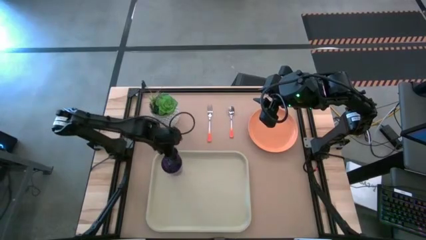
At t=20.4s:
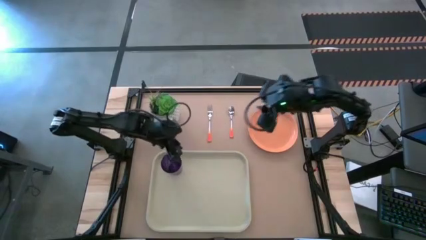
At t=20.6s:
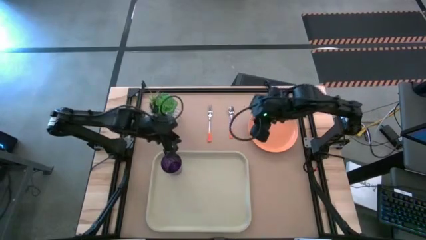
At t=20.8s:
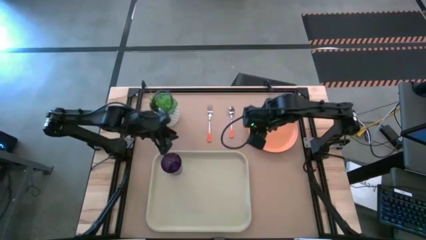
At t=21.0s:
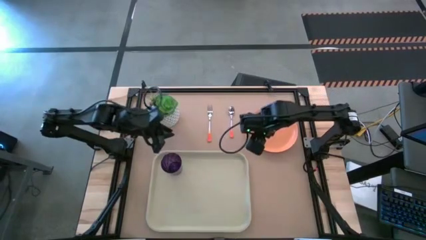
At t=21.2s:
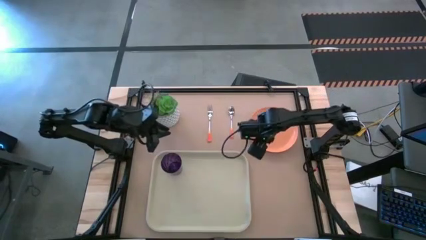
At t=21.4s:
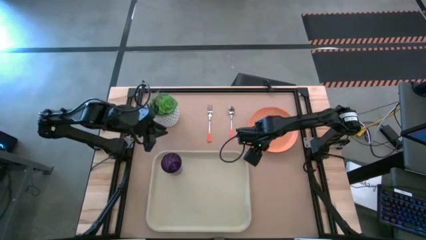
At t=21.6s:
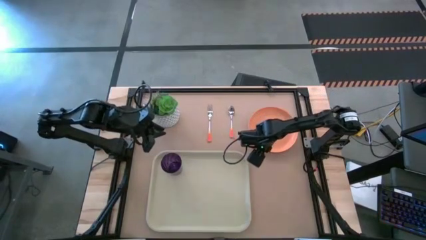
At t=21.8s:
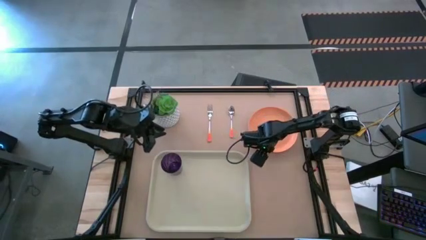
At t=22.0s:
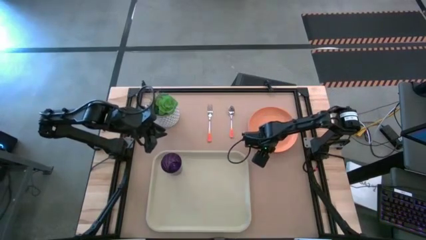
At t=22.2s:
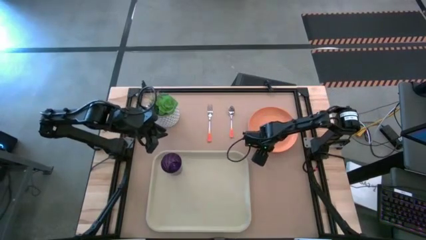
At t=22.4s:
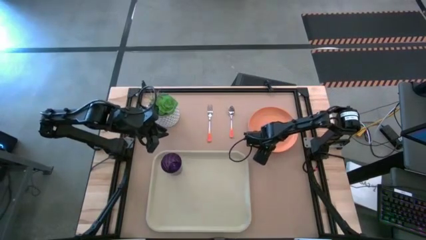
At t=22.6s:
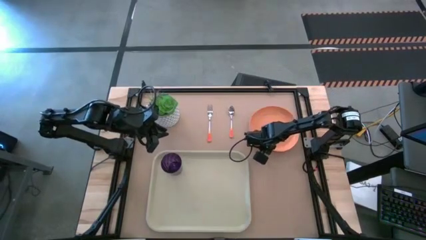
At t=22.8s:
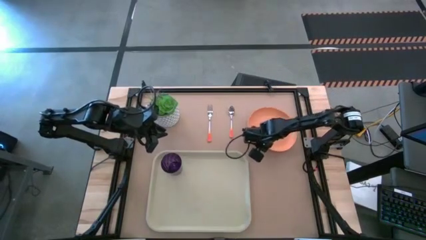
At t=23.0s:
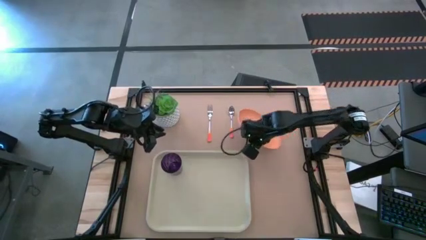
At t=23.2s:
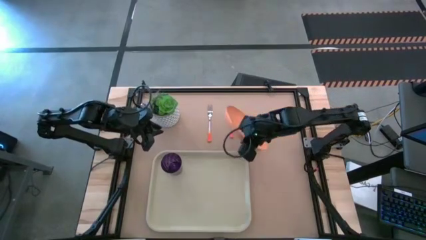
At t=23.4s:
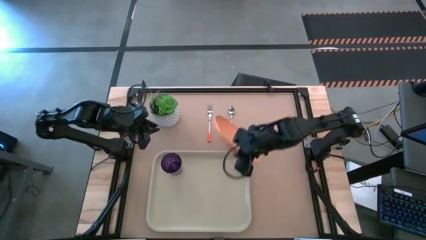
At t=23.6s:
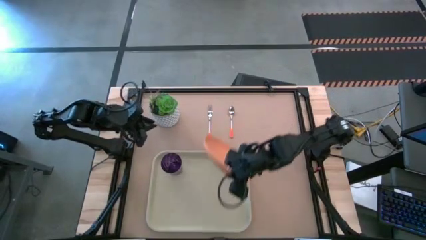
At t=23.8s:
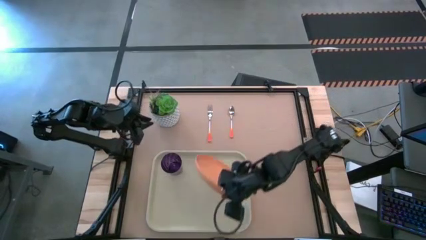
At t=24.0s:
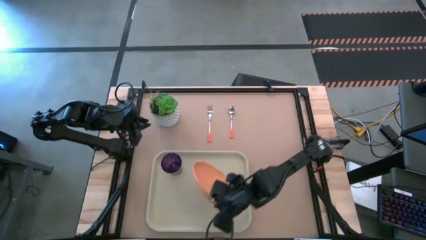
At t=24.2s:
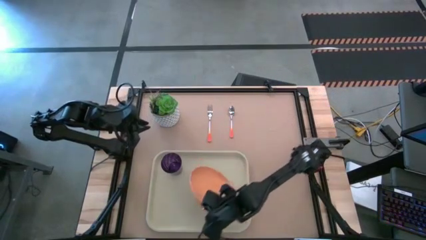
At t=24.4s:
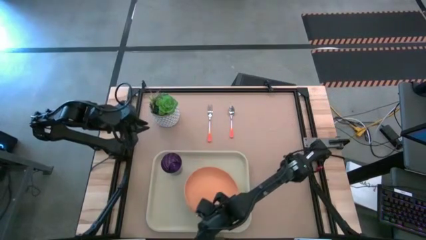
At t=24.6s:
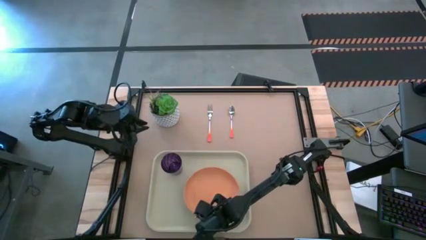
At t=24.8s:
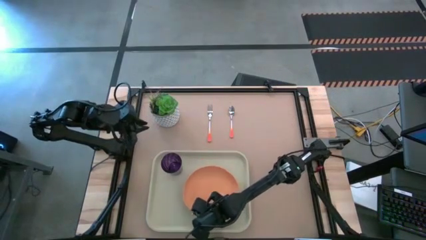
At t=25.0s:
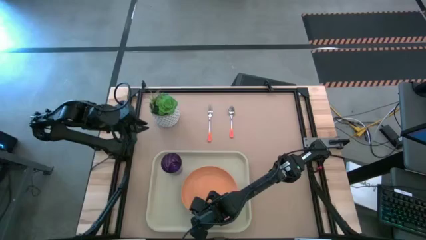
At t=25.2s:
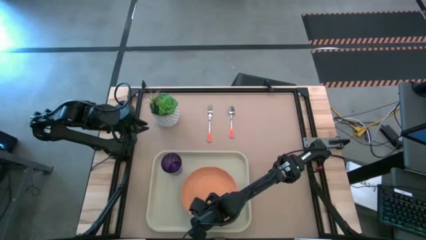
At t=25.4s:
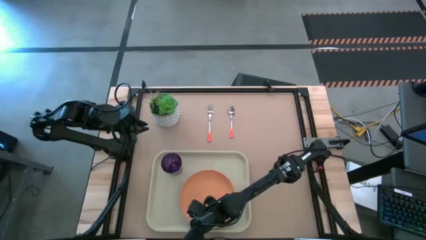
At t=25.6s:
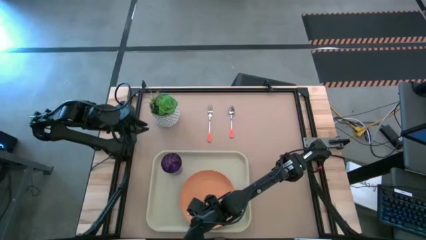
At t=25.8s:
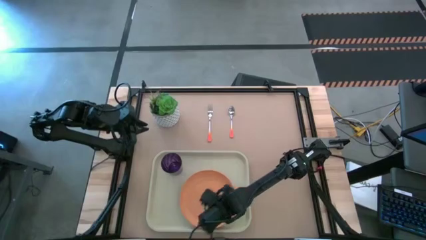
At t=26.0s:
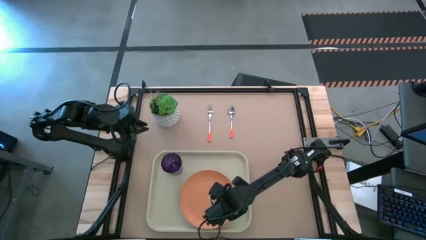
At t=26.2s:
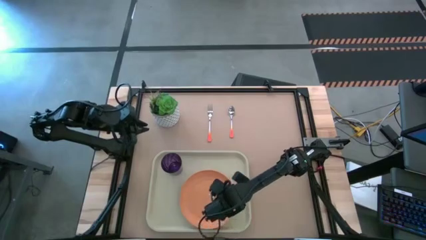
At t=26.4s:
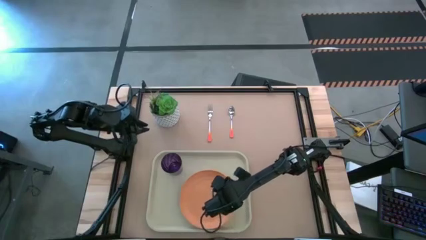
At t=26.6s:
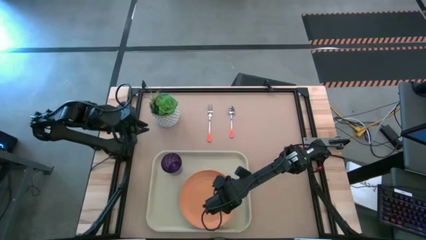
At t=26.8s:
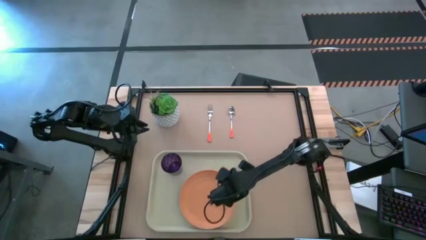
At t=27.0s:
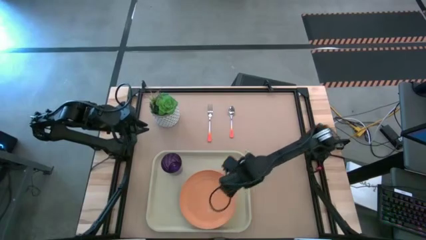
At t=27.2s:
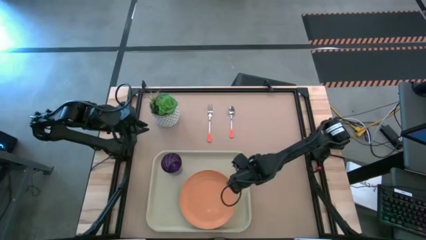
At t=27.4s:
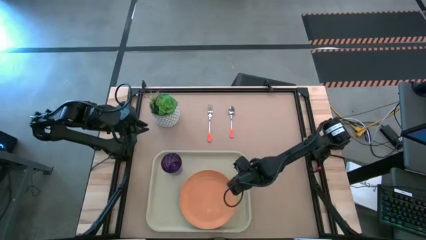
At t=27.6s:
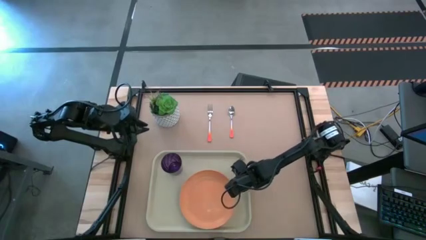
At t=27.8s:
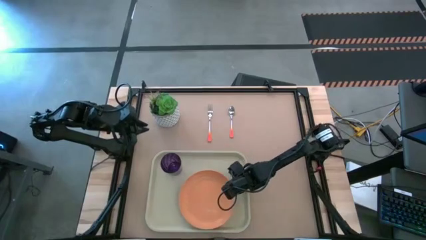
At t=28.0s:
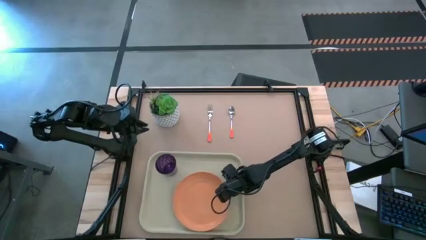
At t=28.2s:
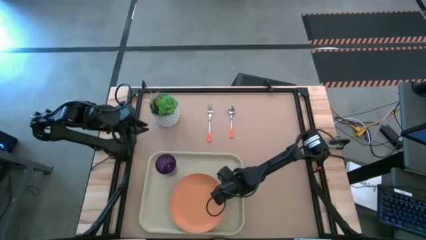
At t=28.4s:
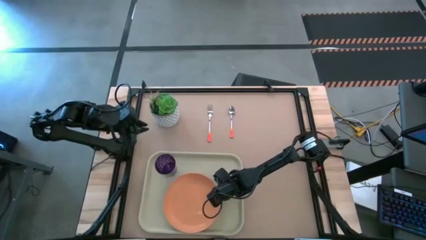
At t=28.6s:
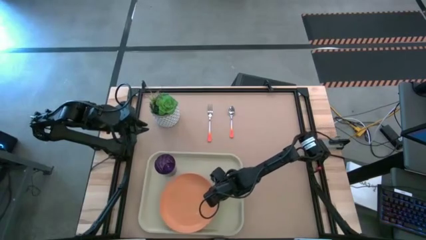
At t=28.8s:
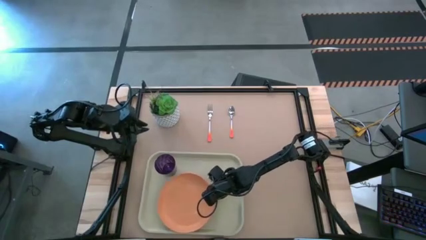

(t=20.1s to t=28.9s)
Task: Pick and place plate/cup/fork/spoon on tray
Put the orange plate on the gray serving tray

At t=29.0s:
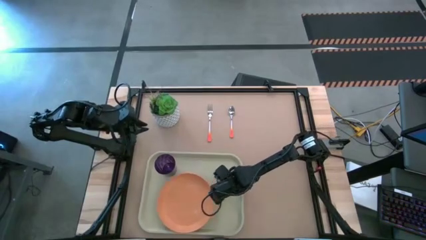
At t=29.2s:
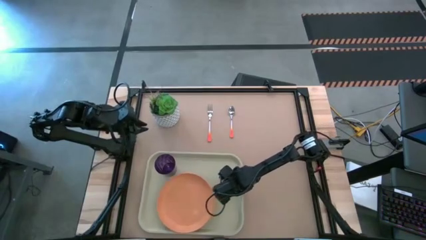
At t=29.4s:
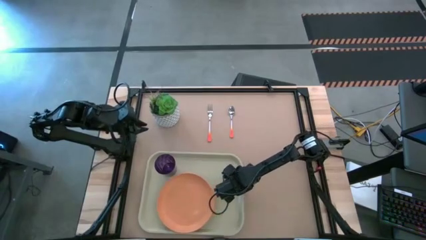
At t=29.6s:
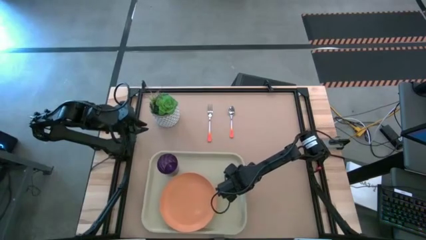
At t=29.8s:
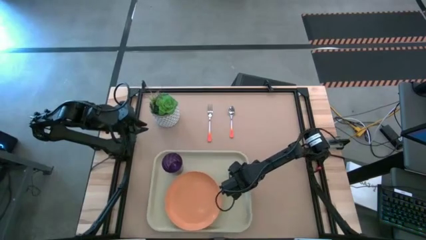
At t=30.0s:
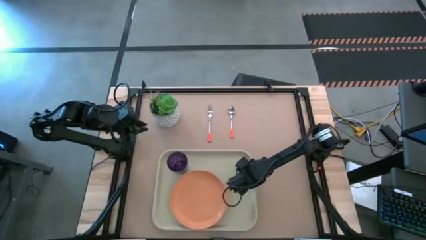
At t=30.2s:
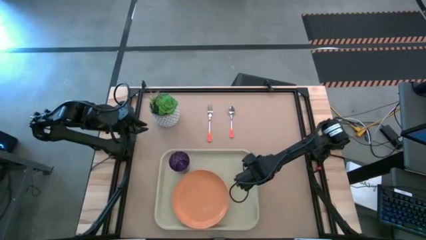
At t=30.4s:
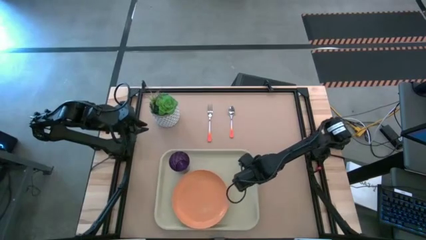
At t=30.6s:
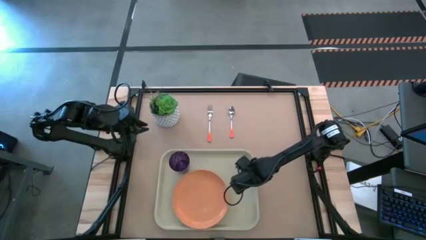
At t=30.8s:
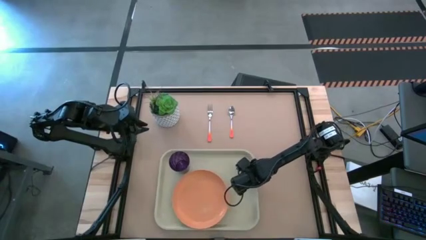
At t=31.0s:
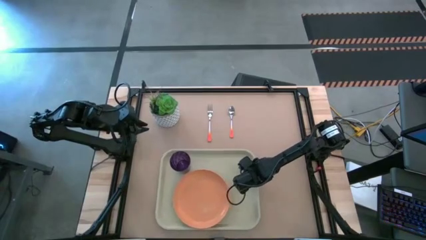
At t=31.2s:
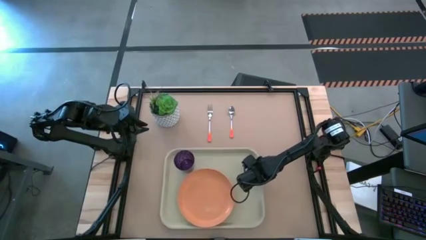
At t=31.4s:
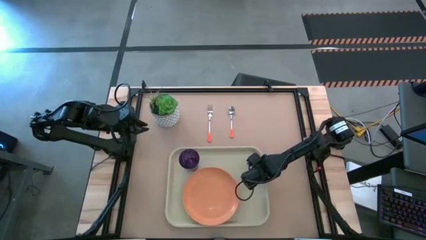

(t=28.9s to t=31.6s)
Adjust the gray serving tray
